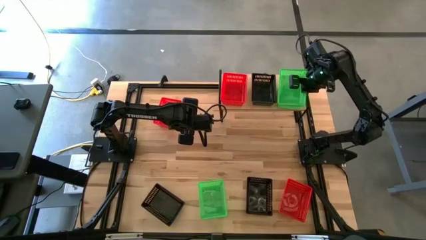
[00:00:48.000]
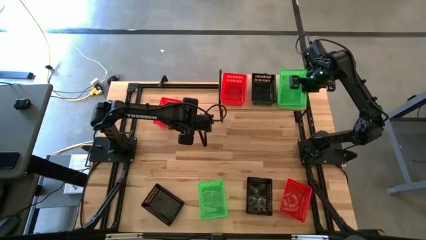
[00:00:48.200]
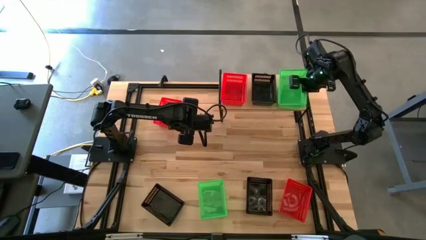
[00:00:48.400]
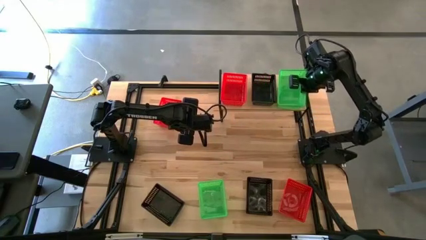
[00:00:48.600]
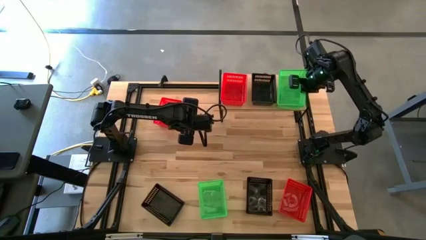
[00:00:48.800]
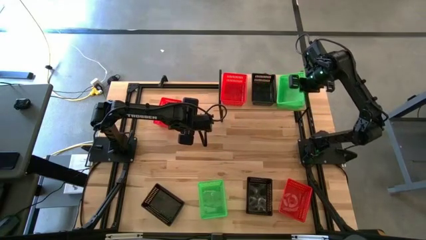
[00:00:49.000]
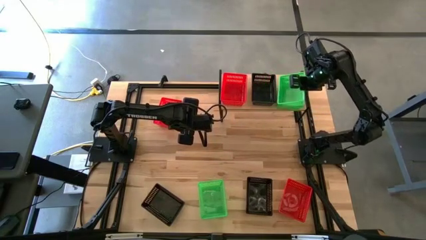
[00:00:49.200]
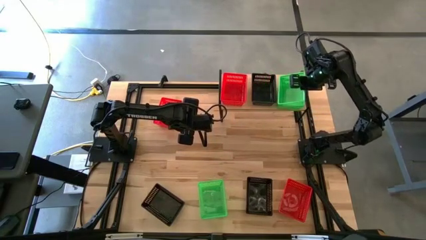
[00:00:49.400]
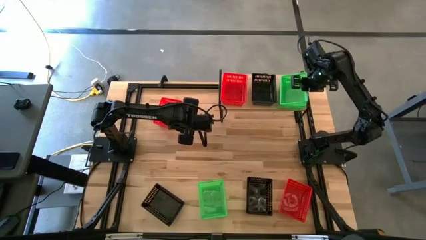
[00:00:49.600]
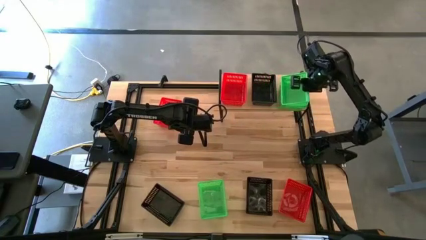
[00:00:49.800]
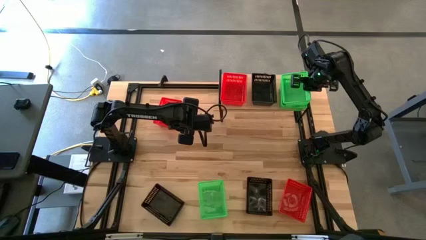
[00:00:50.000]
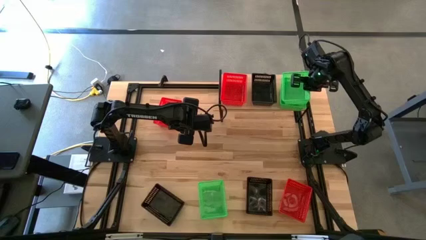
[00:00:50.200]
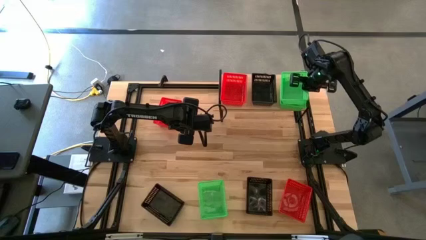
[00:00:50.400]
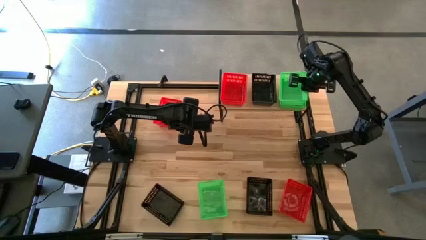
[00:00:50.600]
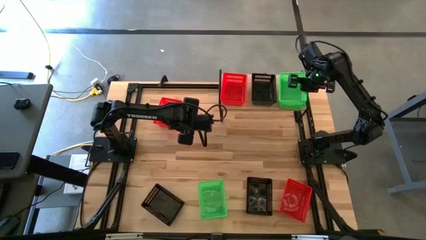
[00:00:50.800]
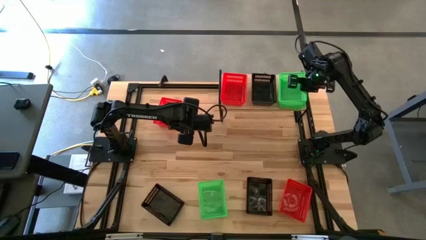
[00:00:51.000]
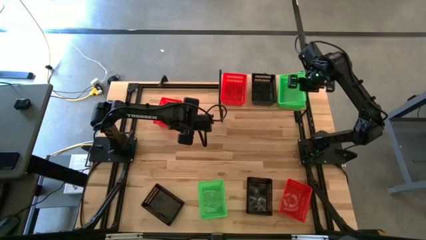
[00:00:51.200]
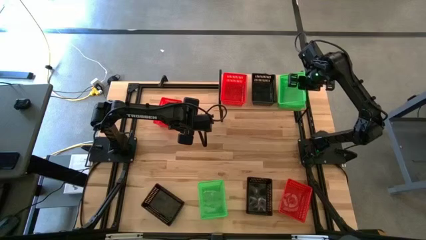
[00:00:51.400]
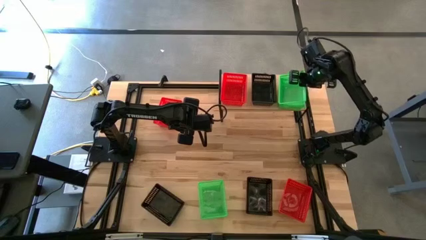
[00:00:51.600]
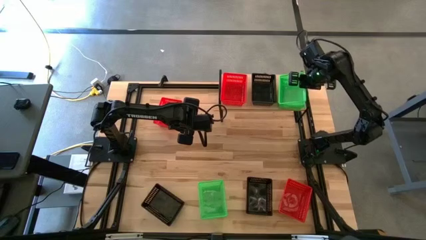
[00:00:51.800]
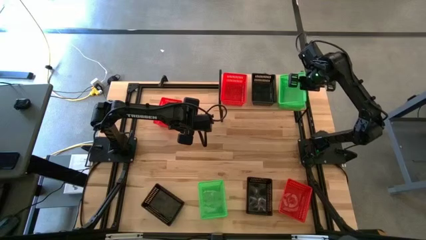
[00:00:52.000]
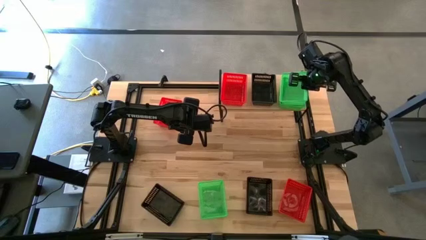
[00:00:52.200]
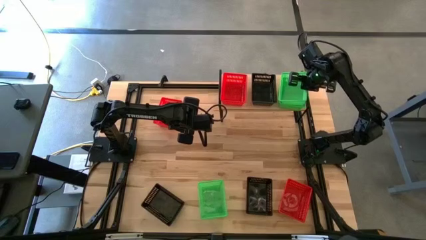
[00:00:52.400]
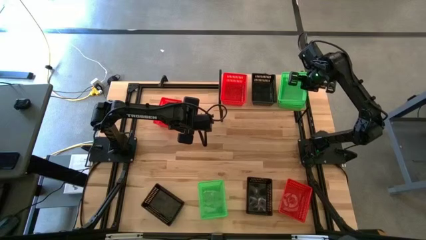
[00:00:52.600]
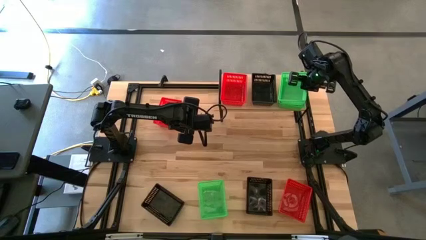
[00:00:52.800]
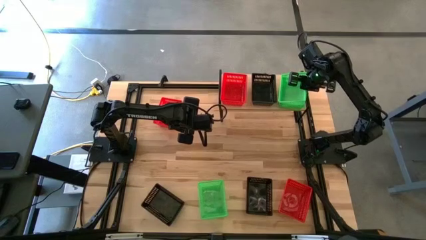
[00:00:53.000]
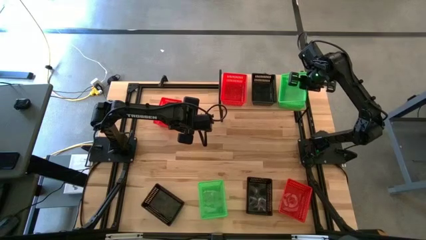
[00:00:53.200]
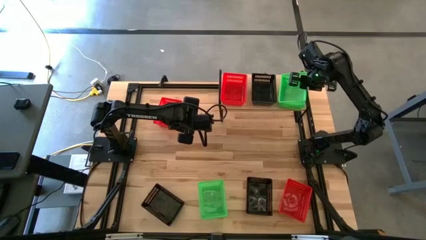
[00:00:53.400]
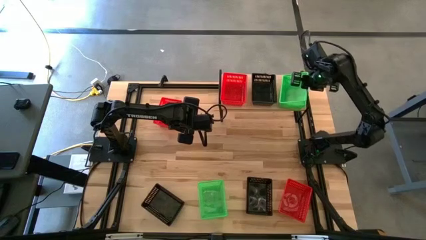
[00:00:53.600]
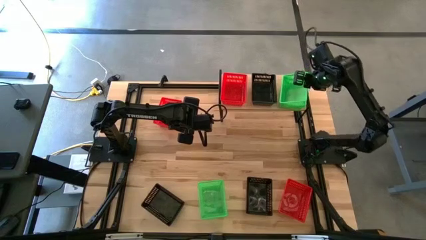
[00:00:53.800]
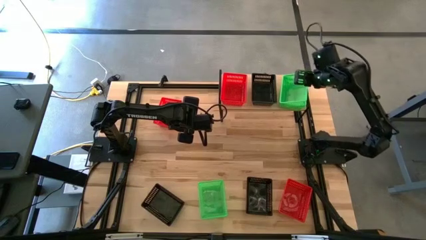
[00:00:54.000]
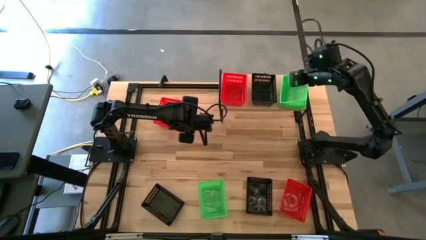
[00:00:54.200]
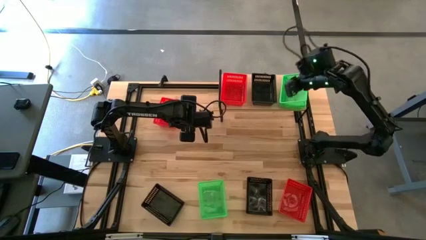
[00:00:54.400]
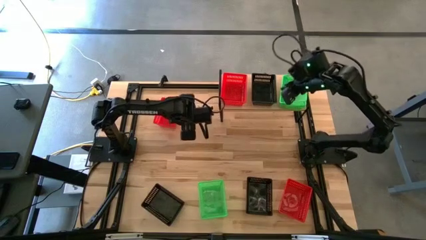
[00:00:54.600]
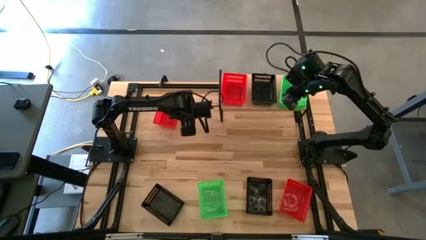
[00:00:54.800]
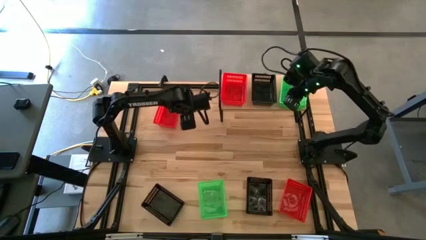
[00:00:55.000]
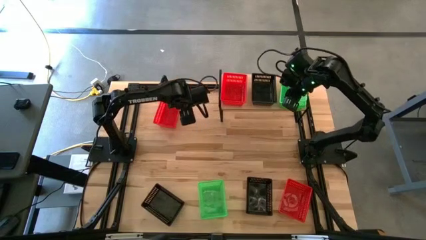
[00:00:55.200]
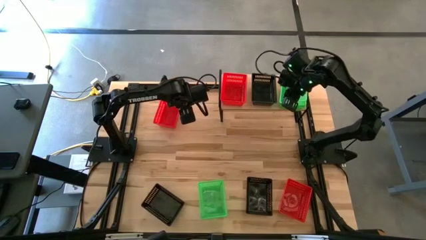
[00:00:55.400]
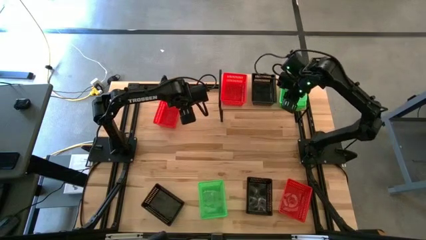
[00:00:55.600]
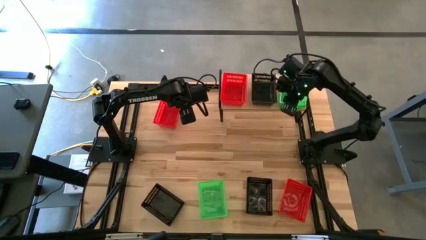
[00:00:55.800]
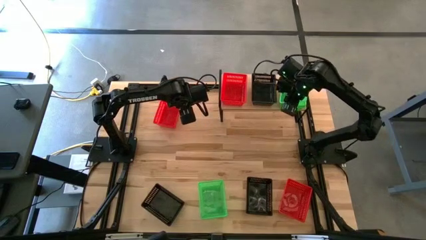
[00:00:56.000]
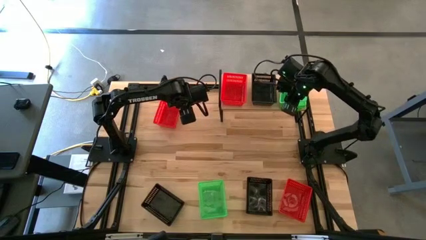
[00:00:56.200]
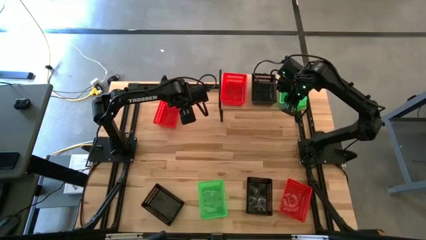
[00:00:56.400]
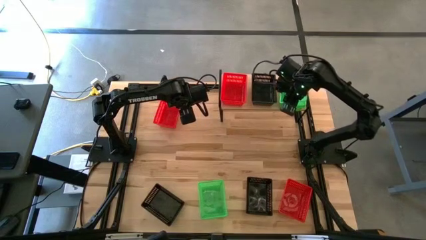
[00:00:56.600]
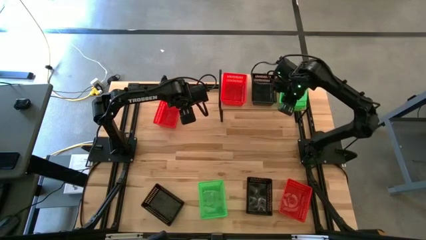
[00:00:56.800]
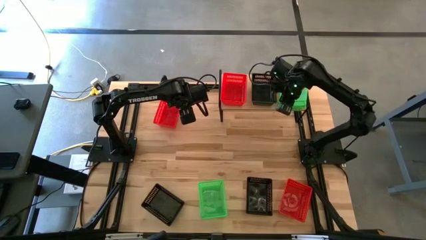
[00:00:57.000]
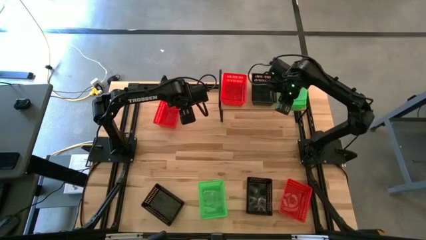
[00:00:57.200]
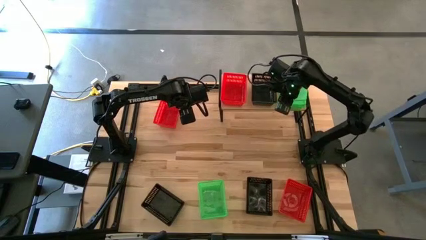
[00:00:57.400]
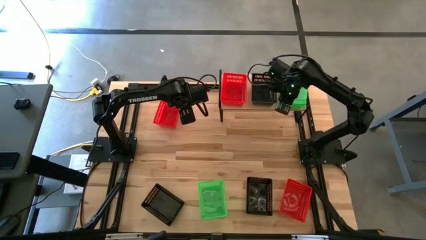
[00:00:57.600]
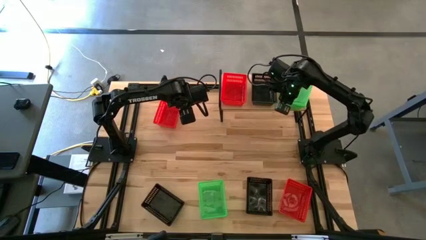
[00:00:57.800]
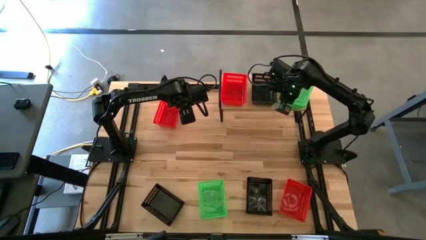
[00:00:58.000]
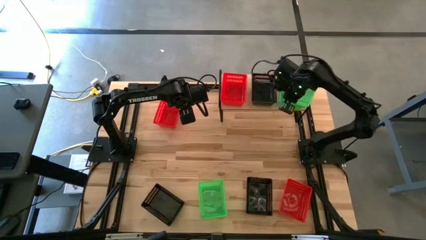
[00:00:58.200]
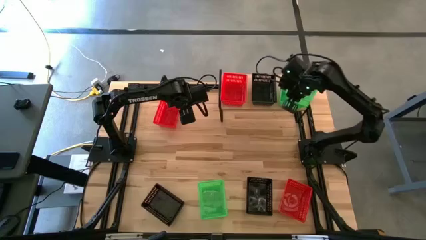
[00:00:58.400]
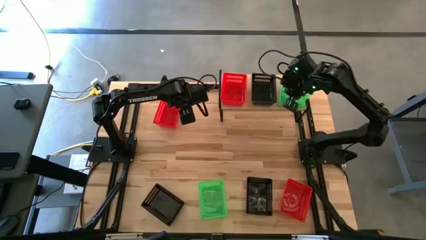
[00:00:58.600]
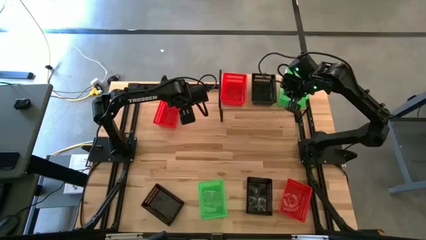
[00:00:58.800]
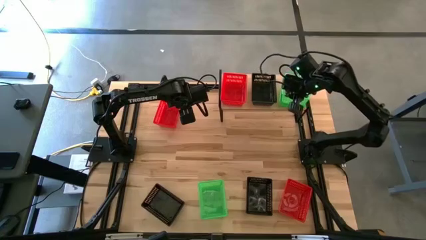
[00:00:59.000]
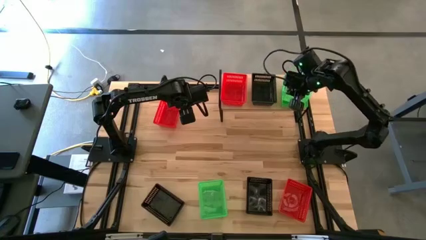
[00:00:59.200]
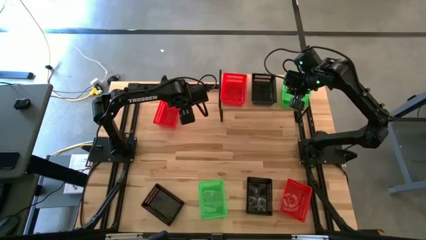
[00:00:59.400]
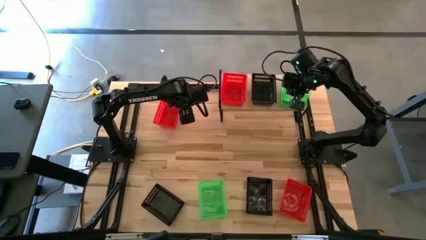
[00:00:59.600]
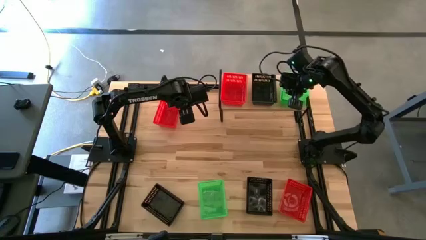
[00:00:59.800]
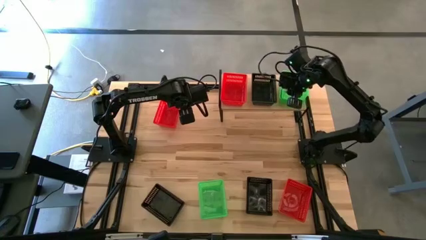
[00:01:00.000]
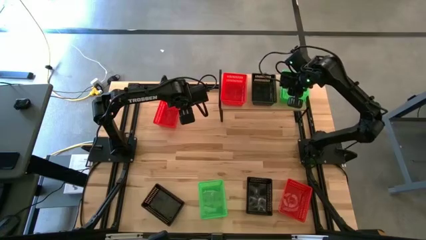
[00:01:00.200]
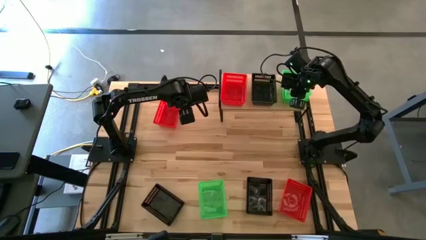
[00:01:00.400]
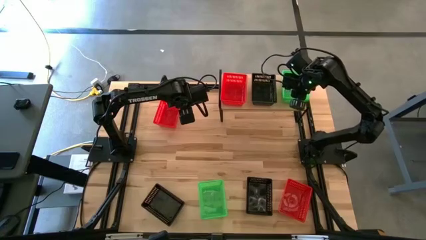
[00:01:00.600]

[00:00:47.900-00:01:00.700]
Task: Stack baskets on shelf by color
Stack the top green basket on top of the other green basket on the shelf

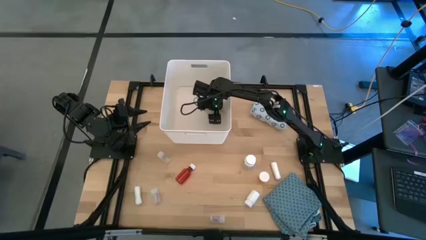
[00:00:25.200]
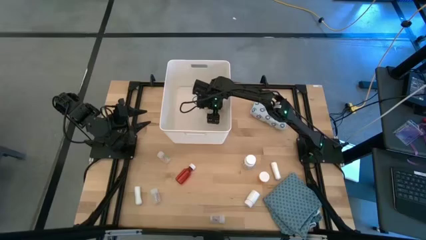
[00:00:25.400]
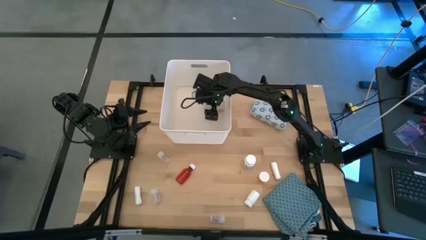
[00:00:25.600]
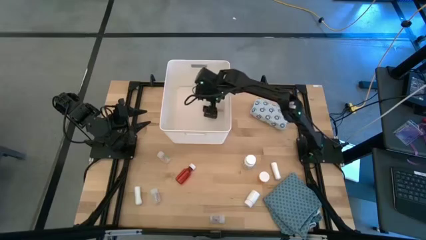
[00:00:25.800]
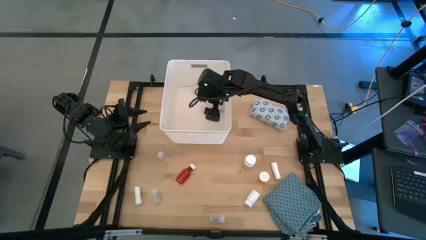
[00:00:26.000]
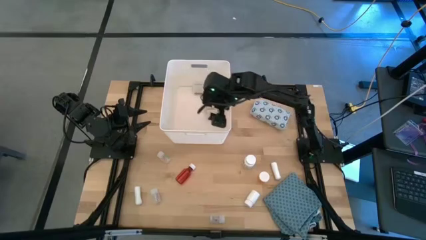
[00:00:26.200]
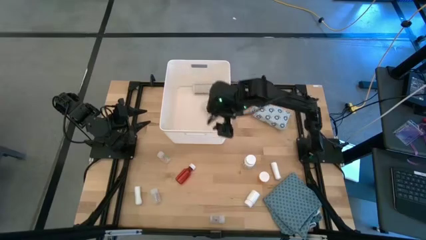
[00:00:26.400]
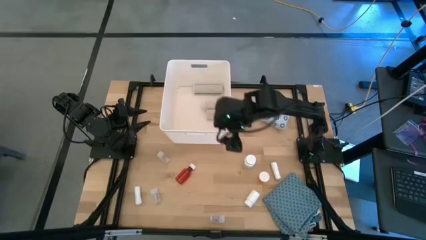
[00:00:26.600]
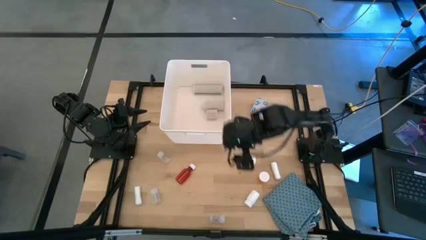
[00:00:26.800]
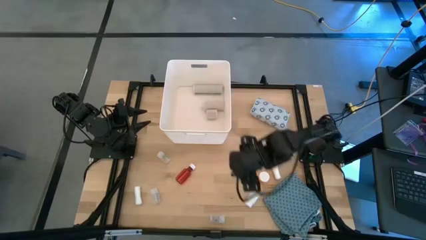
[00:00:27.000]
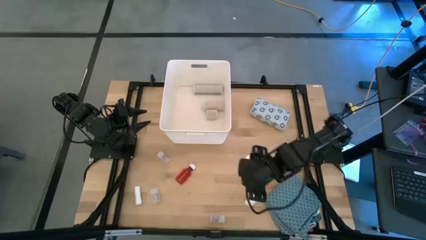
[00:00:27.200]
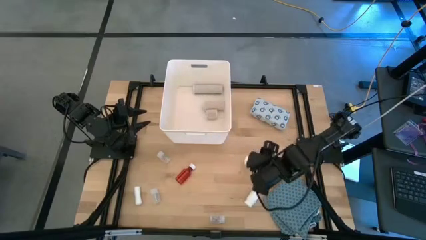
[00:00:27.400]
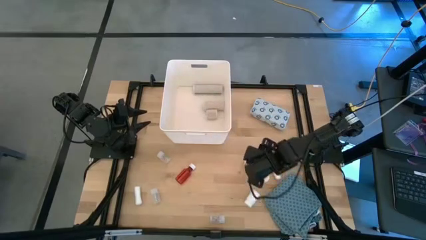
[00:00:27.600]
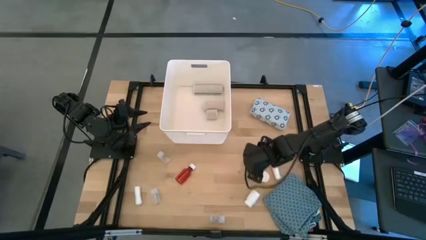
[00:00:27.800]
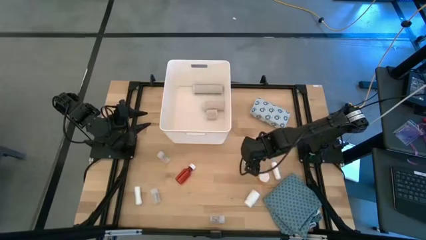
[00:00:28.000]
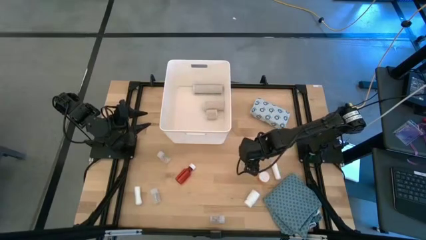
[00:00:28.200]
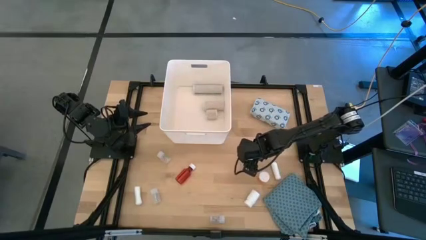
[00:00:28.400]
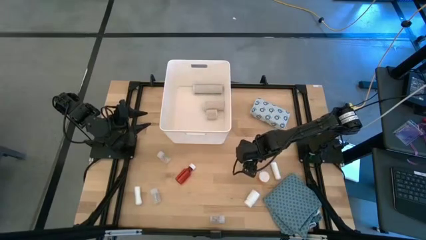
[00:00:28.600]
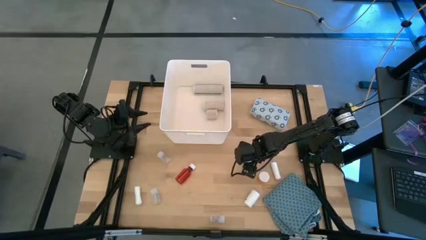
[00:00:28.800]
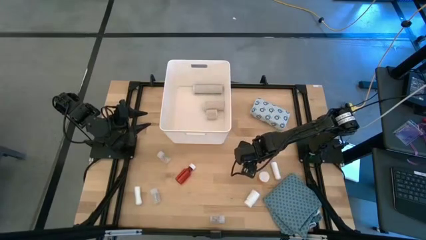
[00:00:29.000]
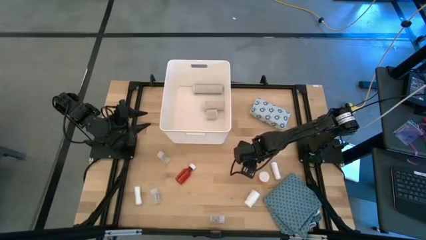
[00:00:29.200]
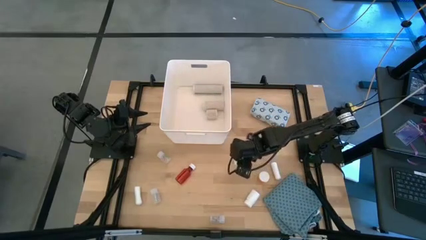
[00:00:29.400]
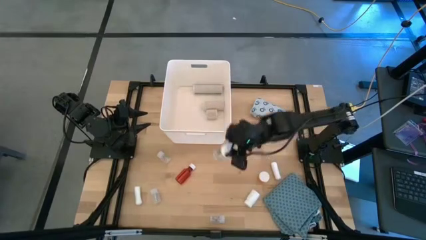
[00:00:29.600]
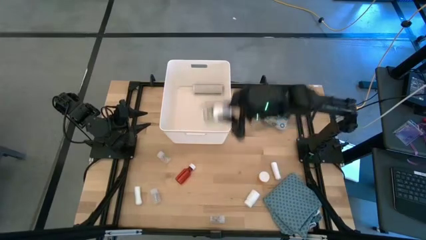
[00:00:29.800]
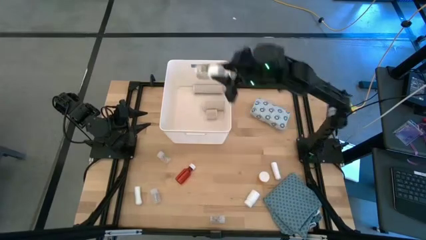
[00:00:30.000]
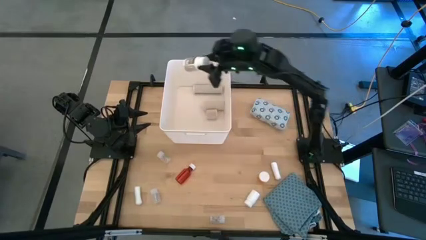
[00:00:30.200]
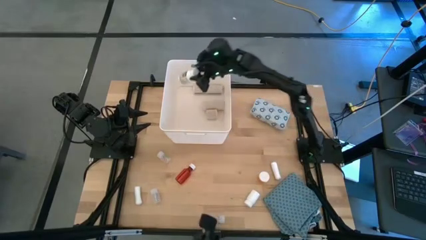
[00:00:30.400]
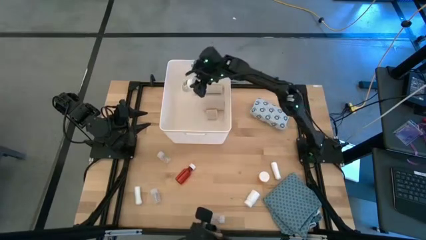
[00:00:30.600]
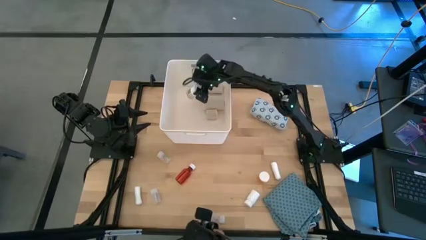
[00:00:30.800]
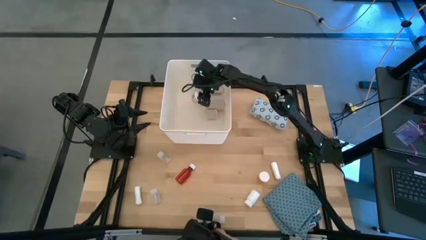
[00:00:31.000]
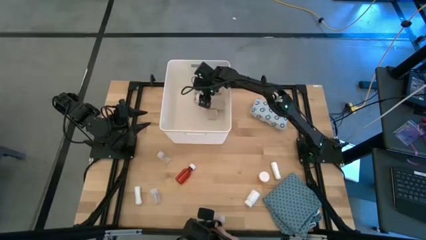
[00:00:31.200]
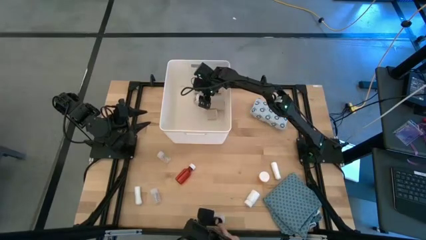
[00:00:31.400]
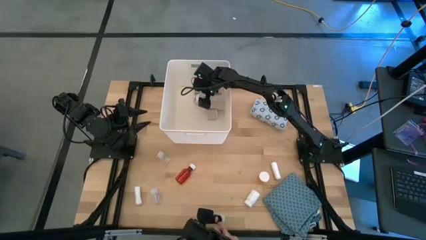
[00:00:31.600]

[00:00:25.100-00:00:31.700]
Task: Pick & place medical supplies in basket/bin
Put the top white pill bottle into the white bin
